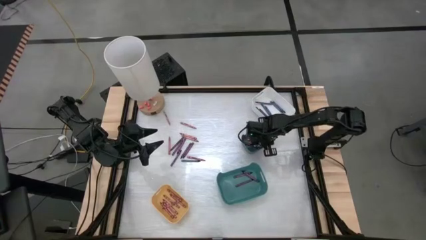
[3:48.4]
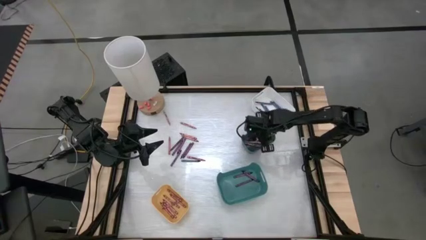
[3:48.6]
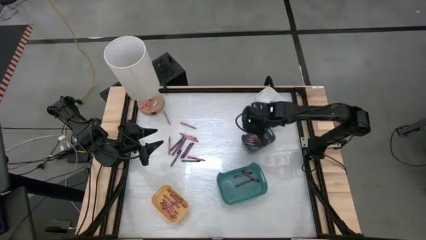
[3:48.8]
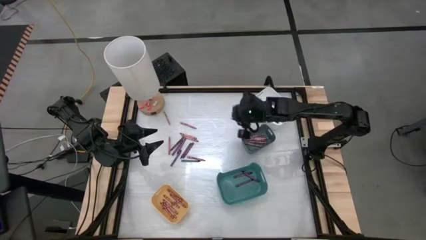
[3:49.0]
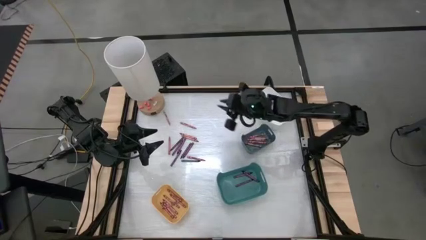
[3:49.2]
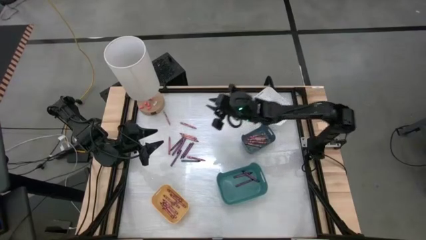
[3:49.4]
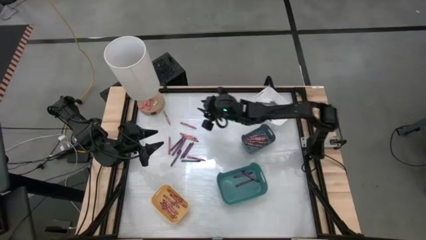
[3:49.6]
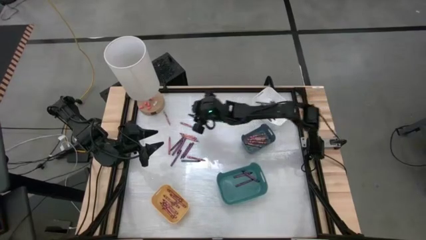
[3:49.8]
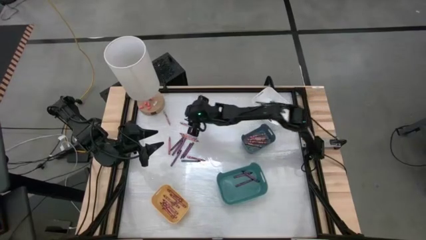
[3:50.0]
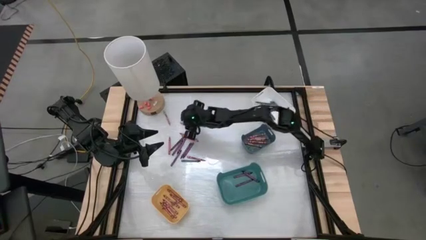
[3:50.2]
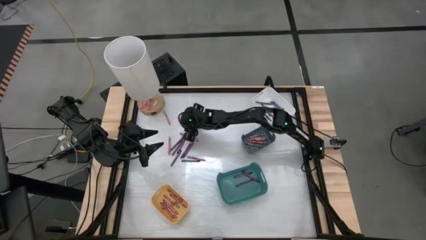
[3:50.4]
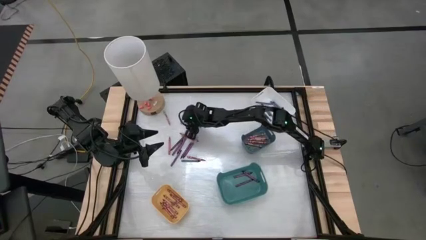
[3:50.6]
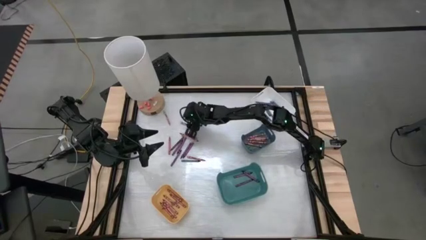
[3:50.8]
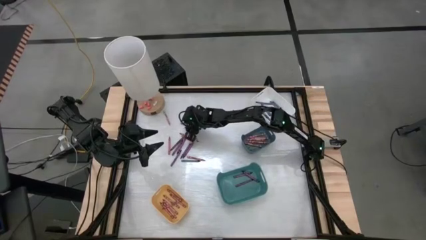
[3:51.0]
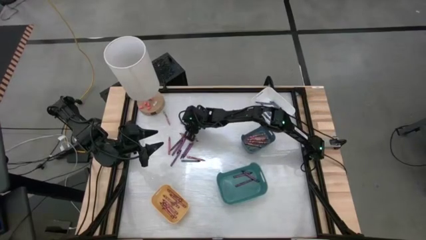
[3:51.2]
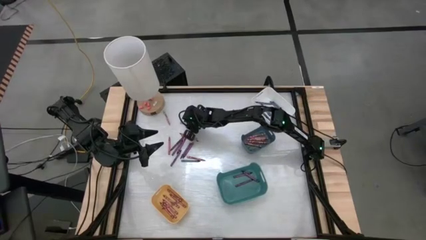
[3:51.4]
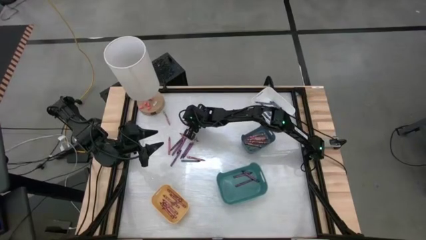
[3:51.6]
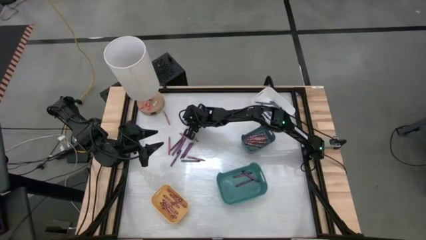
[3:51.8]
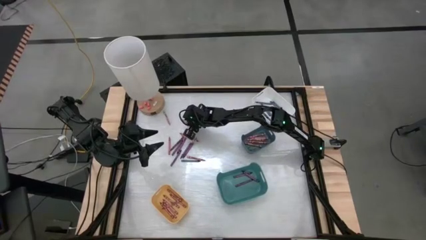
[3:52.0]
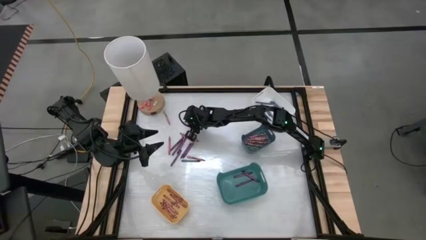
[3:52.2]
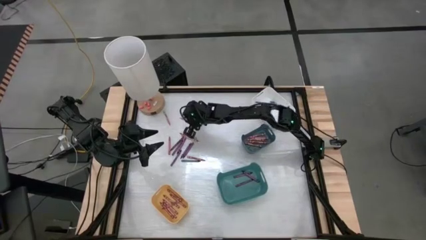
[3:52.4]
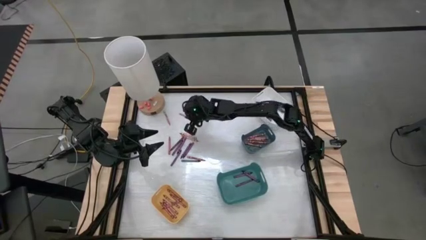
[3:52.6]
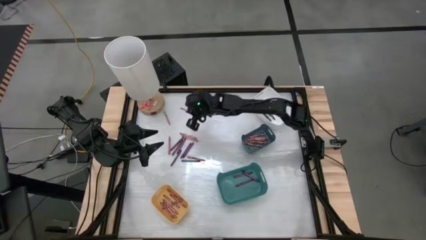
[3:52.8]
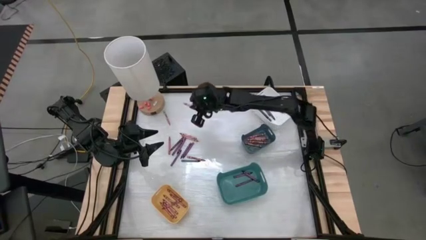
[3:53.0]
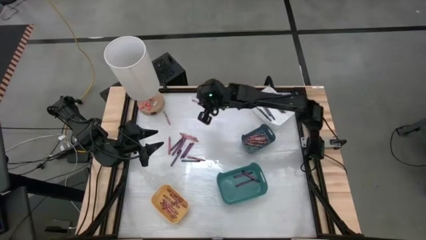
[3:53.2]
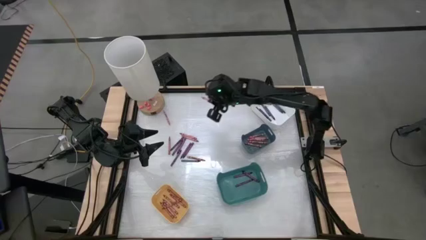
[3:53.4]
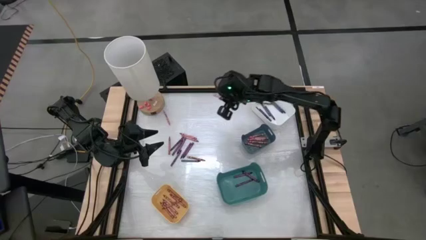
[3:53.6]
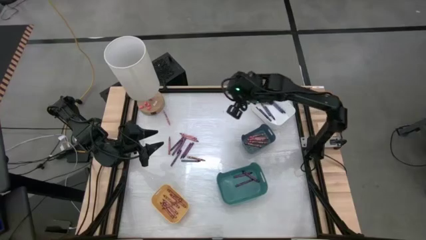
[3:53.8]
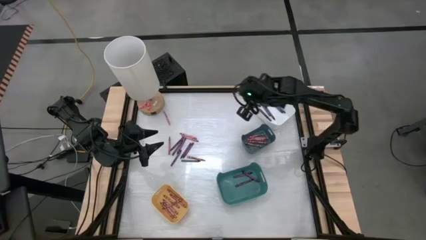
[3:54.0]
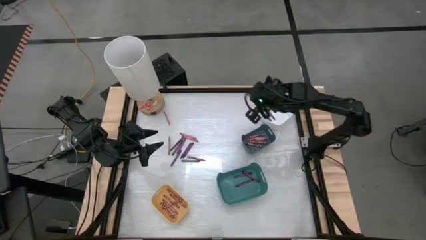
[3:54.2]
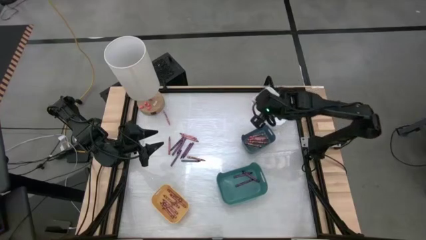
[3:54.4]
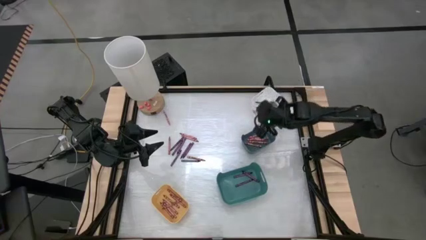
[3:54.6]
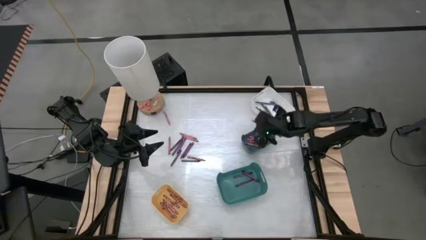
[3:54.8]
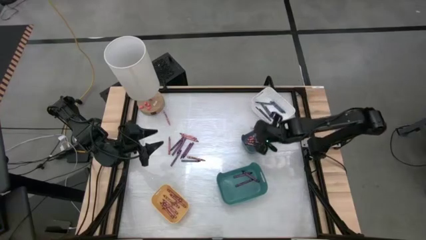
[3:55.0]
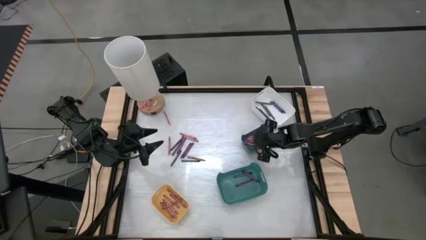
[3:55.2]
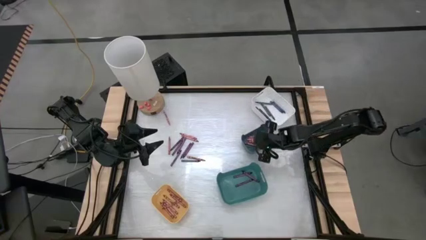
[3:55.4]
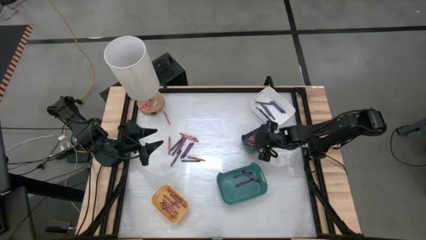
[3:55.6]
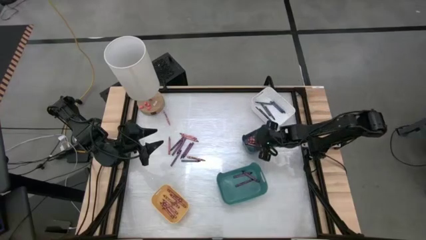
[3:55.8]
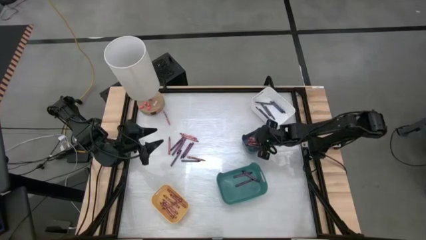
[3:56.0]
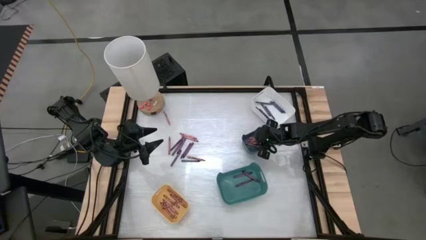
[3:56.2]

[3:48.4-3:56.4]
Task: Sort crayons
Put the pink crayon into the dark blue bin

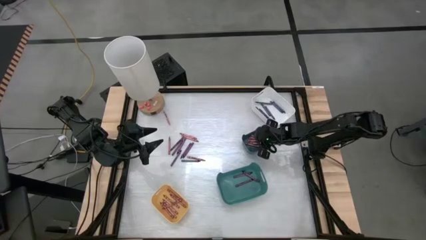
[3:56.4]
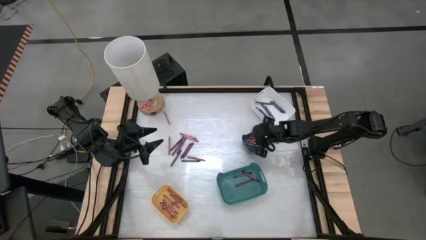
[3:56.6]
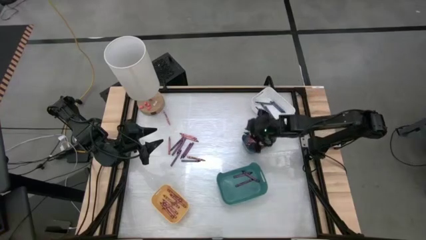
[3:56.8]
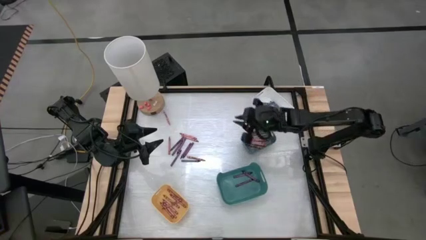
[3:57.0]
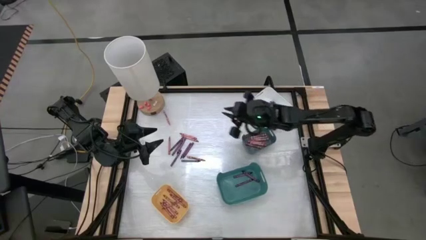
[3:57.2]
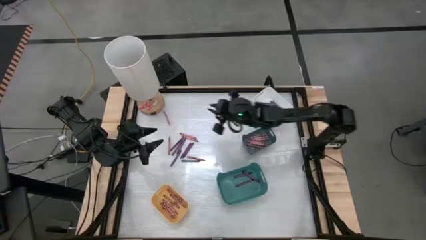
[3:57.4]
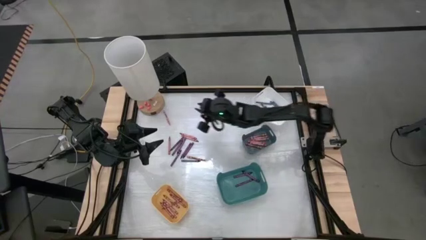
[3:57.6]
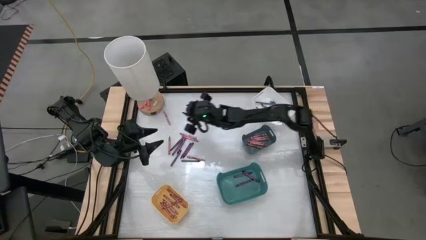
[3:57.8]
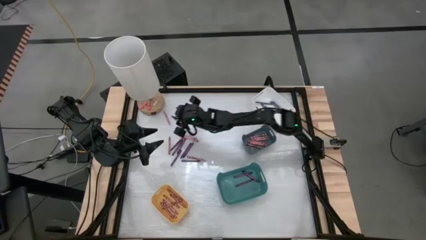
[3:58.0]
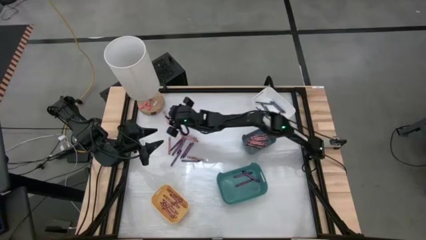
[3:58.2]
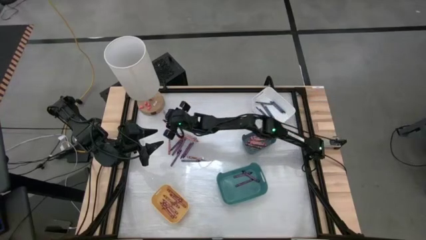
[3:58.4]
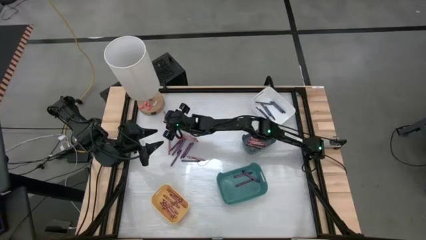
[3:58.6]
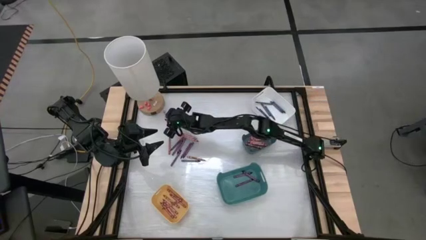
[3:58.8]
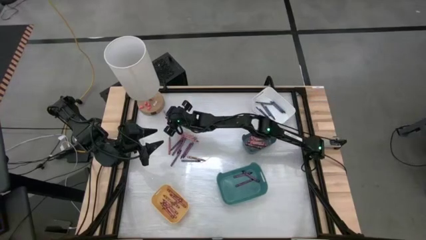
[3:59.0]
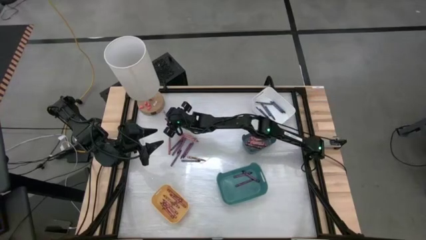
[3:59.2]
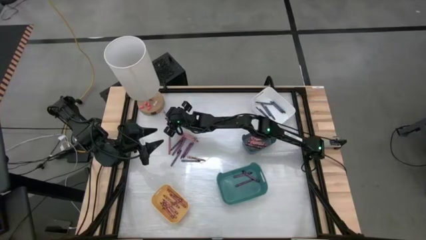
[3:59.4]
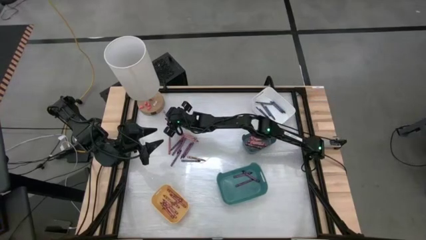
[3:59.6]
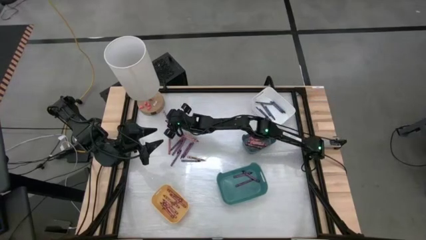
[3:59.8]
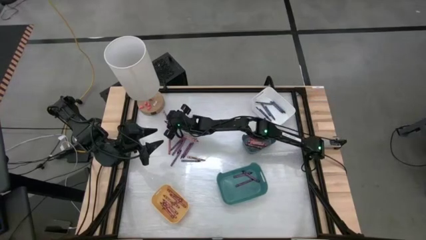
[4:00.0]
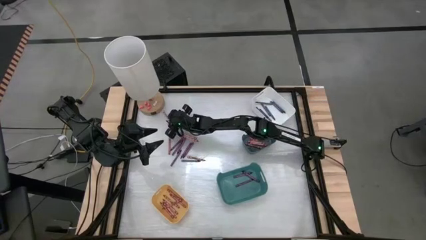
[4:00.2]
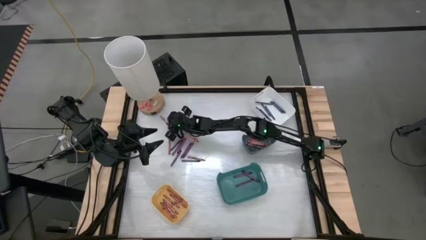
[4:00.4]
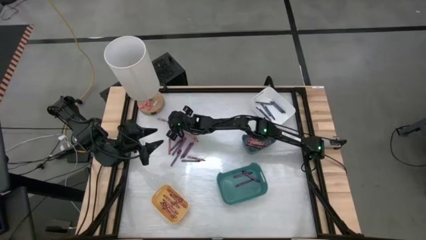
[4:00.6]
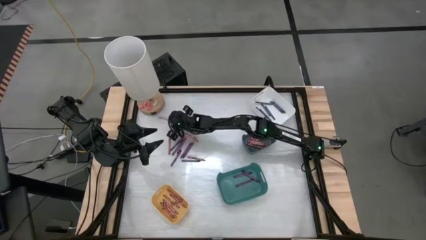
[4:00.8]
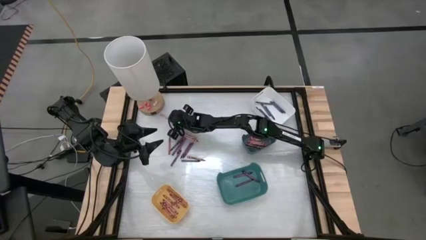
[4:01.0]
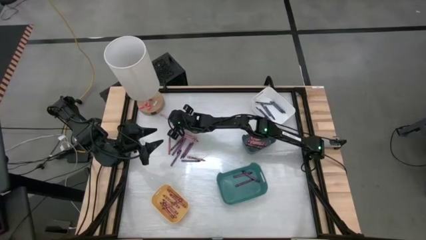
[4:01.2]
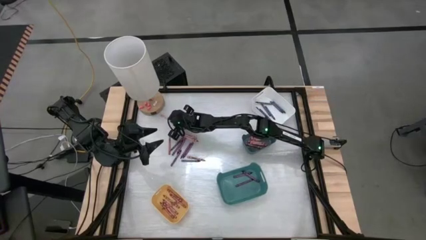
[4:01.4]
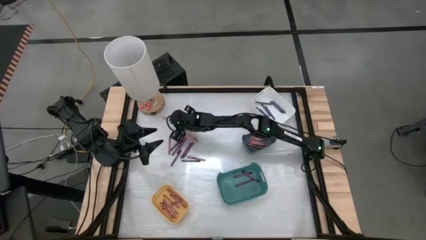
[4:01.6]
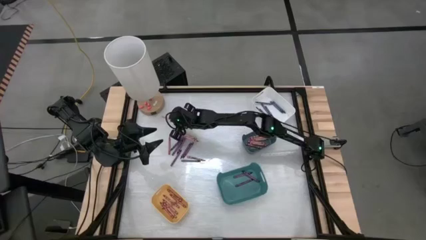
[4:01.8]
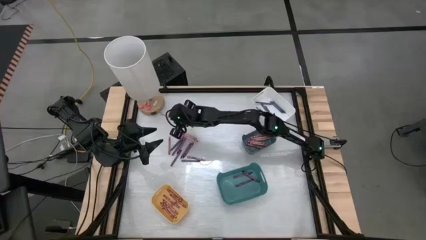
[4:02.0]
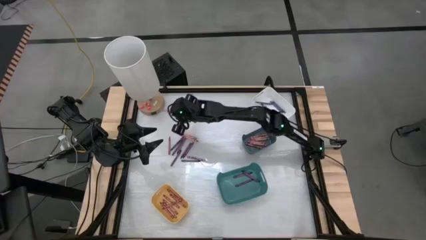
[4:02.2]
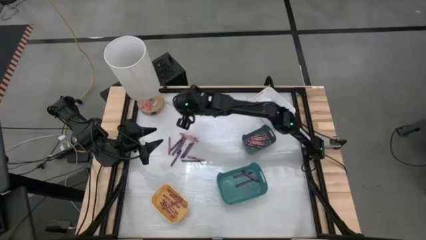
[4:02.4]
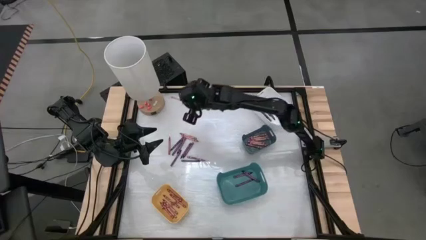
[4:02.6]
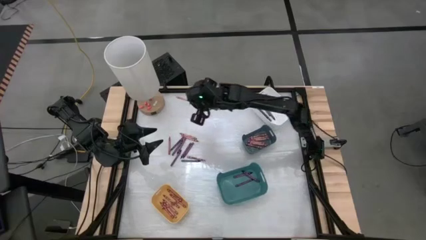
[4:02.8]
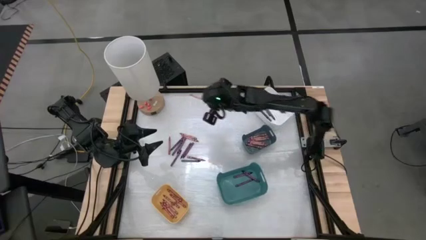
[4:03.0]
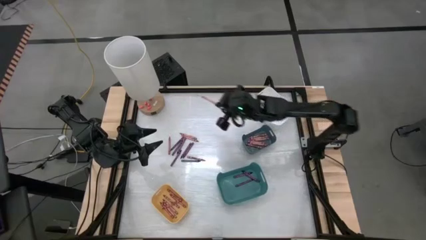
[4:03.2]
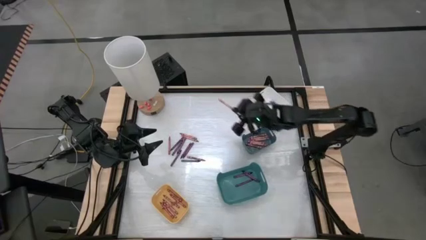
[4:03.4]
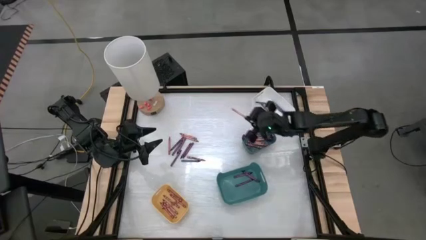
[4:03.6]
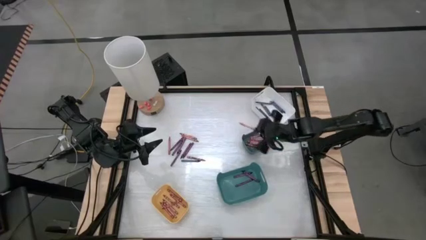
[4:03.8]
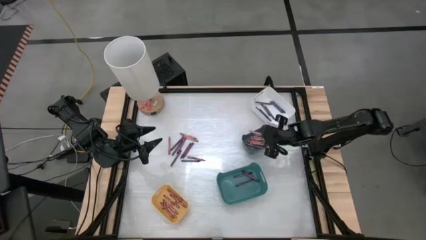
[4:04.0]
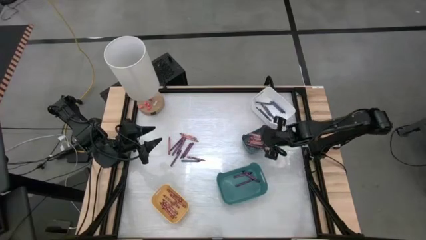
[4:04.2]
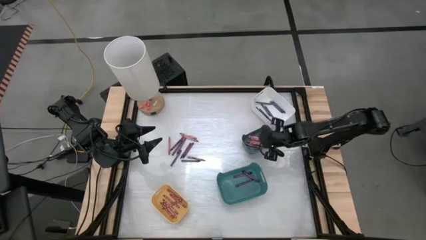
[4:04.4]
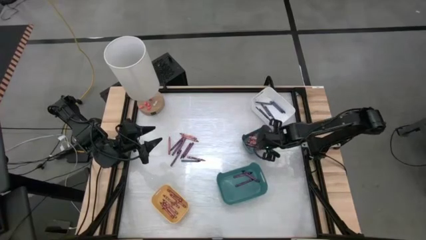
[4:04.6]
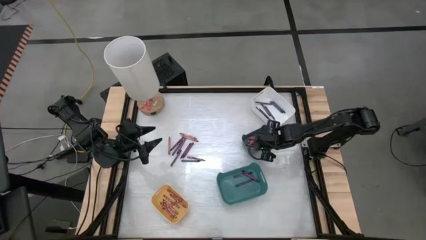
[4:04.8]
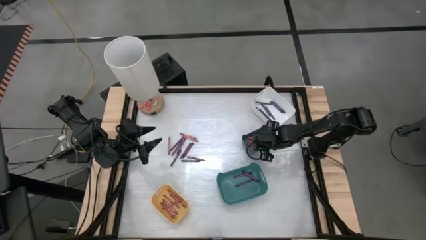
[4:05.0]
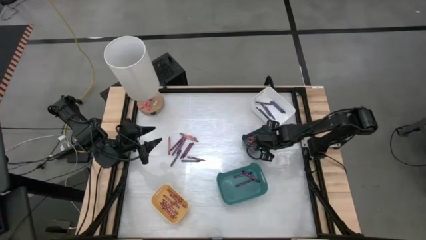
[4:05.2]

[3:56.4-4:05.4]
Put the pink crayon into the dark blue bin
